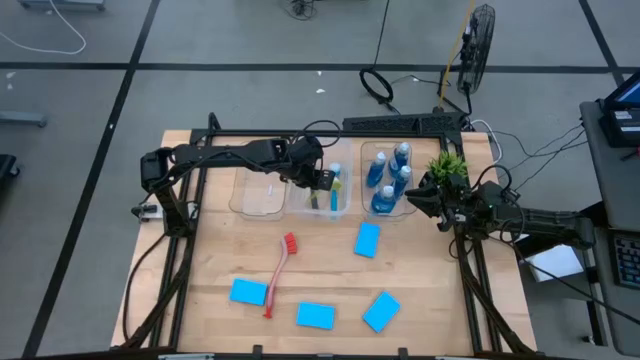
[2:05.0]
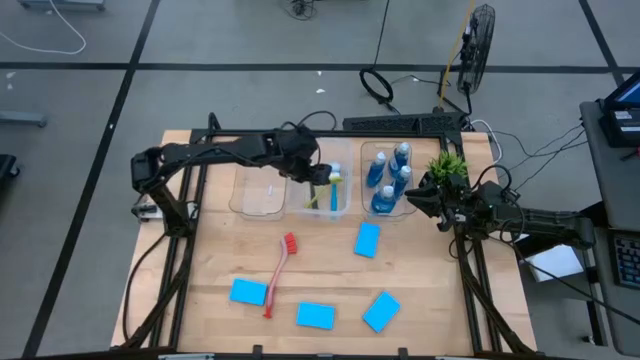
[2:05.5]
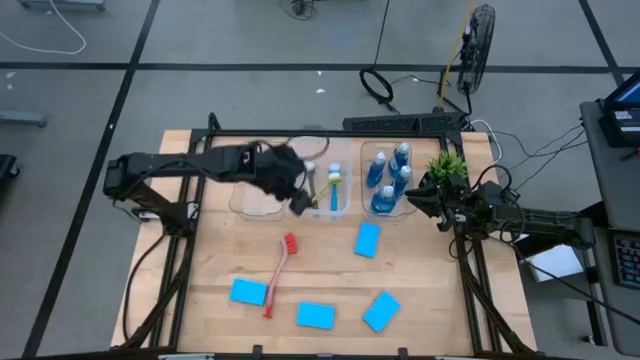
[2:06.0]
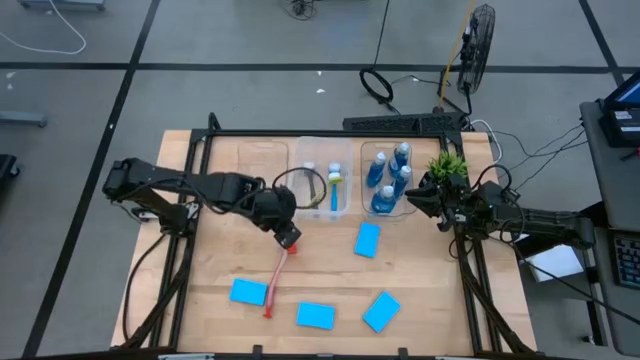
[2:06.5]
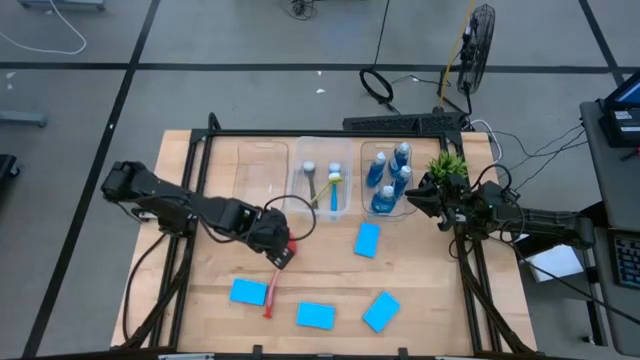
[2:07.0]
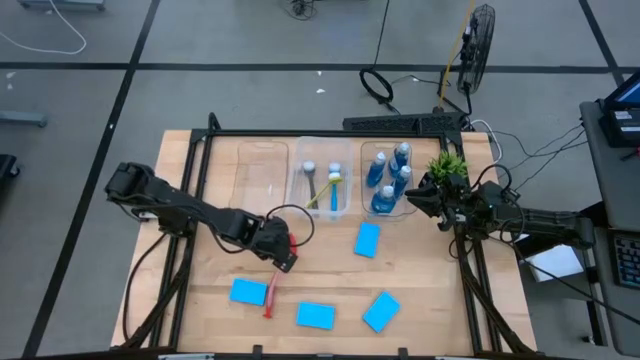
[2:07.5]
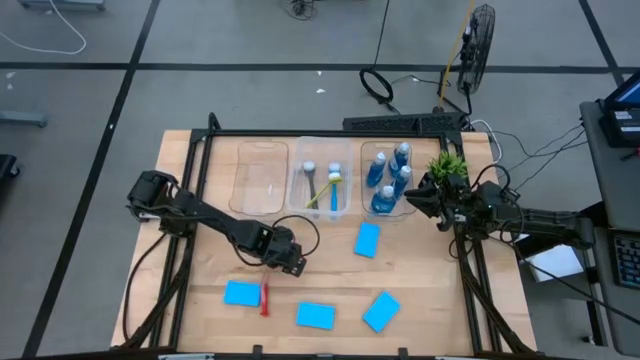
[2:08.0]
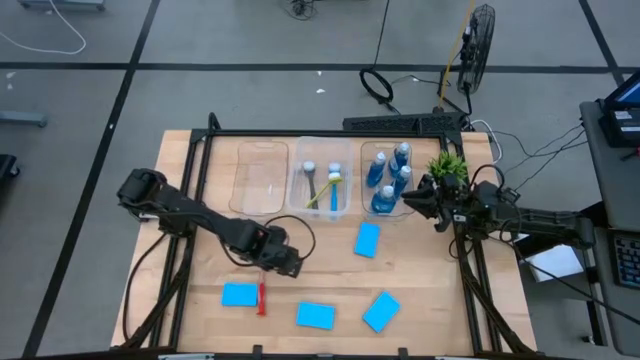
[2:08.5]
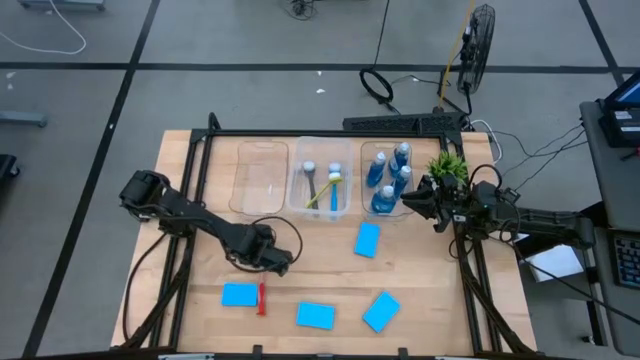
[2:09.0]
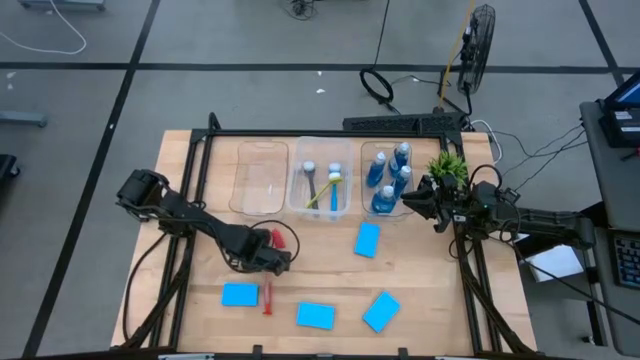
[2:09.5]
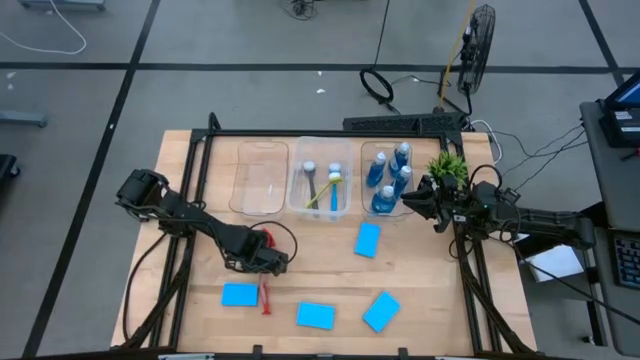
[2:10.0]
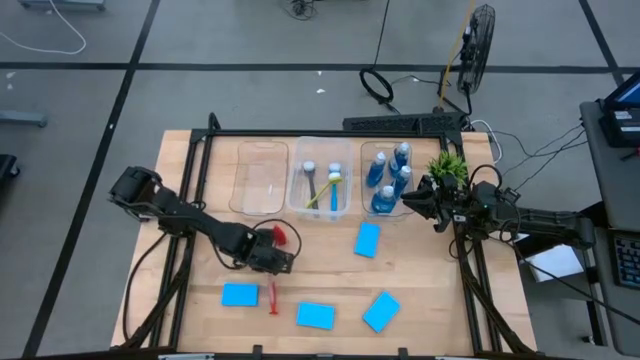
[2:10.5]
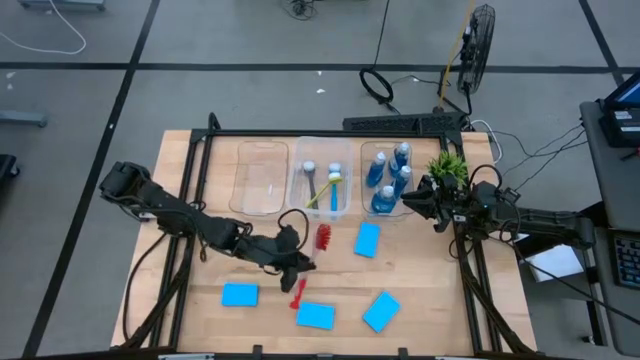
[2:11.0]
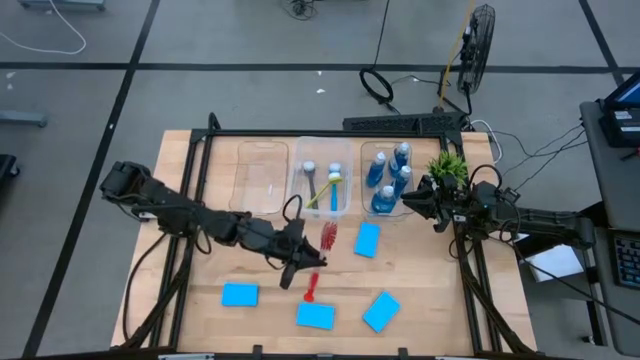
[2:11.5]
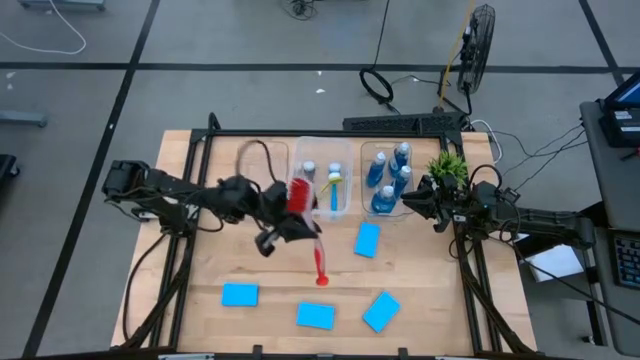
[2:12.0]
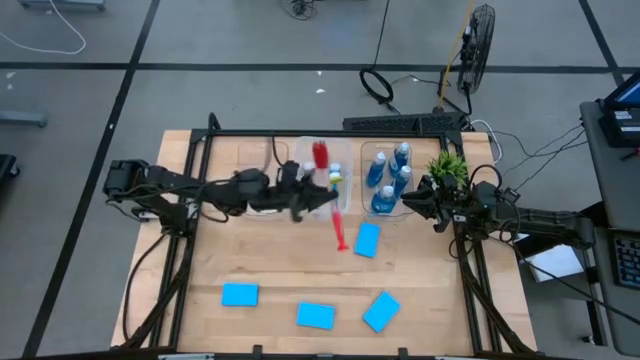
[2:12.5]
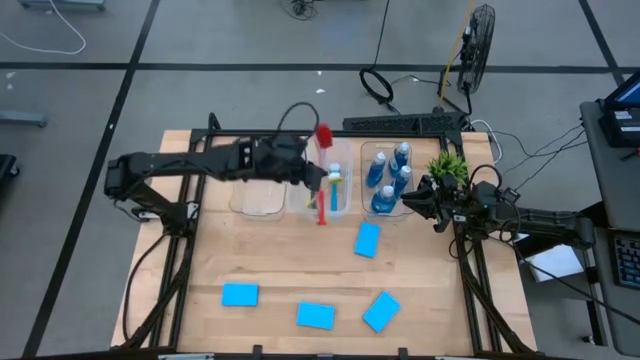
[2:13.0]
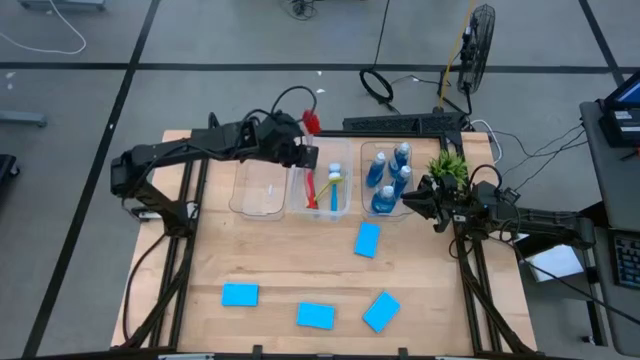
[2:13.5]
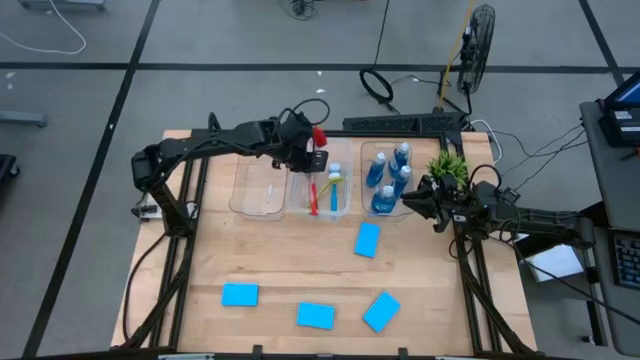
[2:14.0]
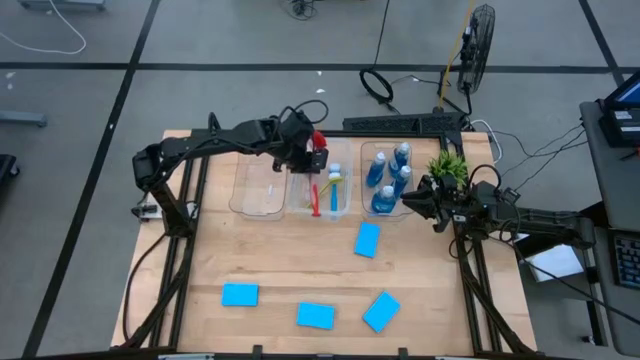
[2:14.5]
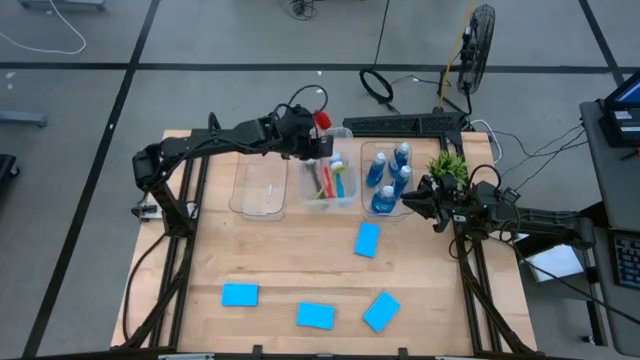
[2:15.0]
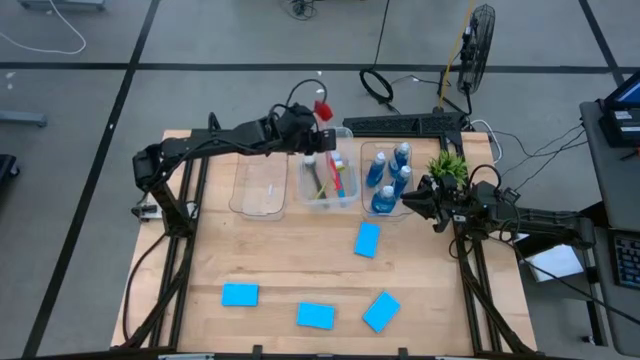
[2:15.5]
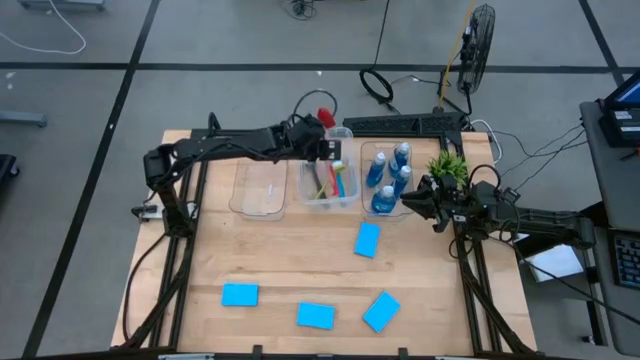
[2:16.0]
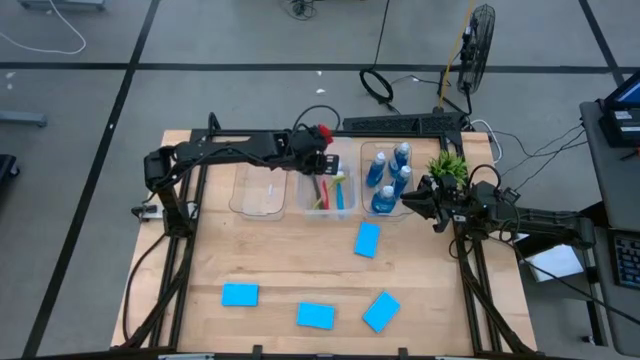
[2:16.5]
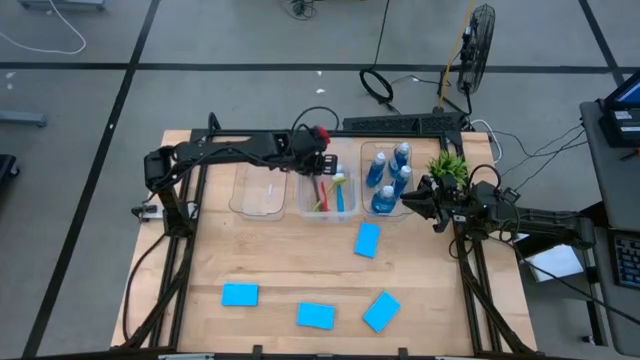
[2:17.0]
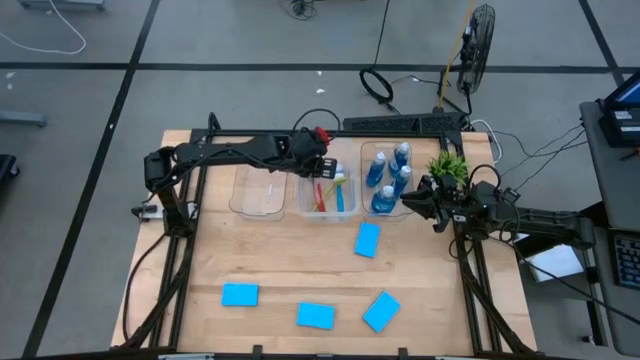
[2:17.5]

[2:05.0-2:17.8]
Task: Pick & Place Kitchen Sink Supplies
Put the orange dishwashing brush into the transparent white bin

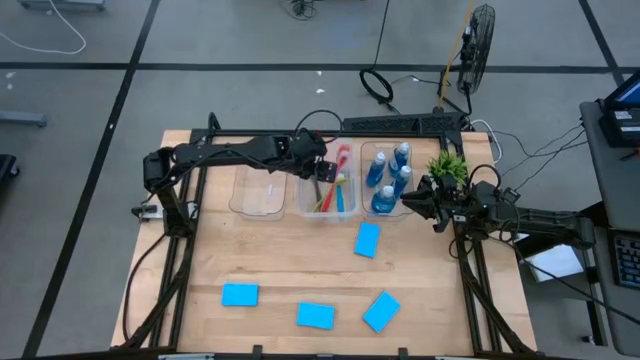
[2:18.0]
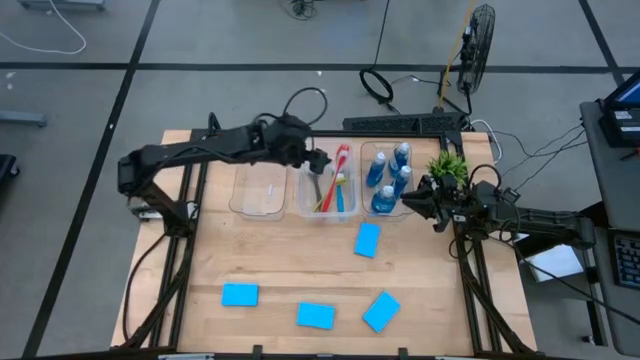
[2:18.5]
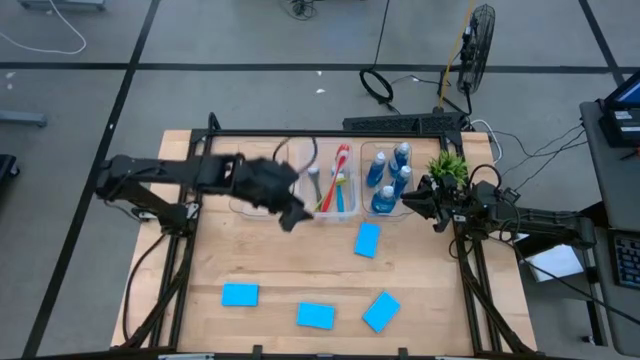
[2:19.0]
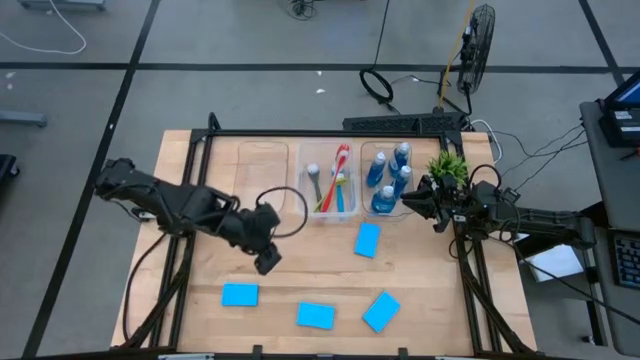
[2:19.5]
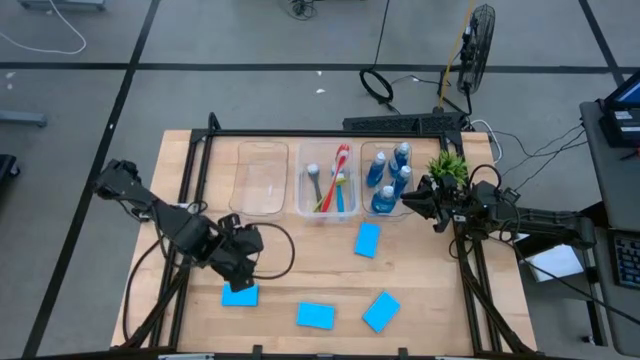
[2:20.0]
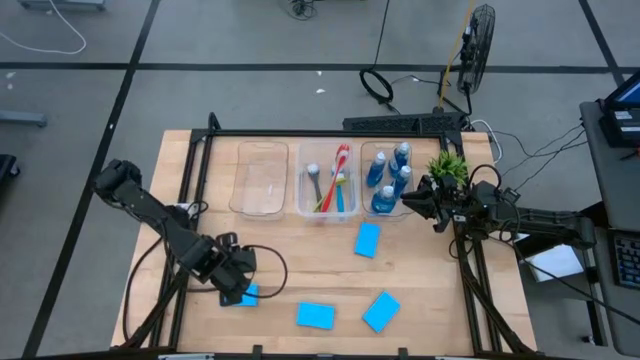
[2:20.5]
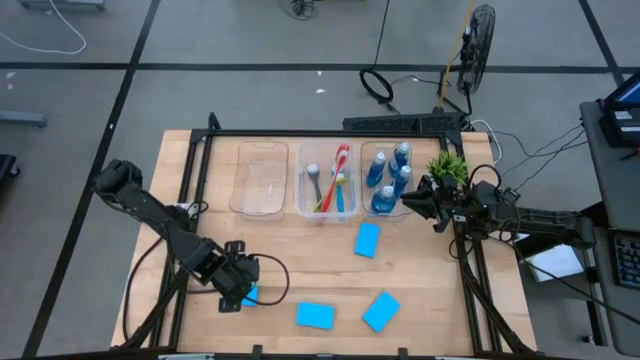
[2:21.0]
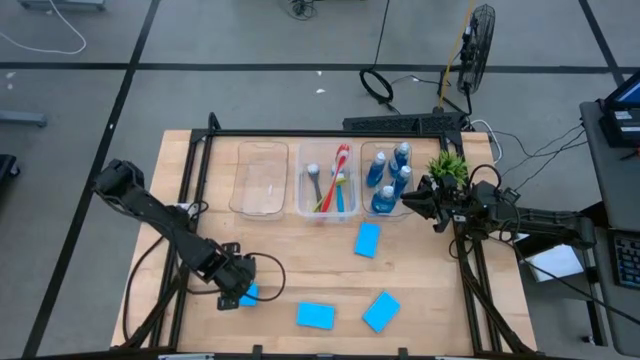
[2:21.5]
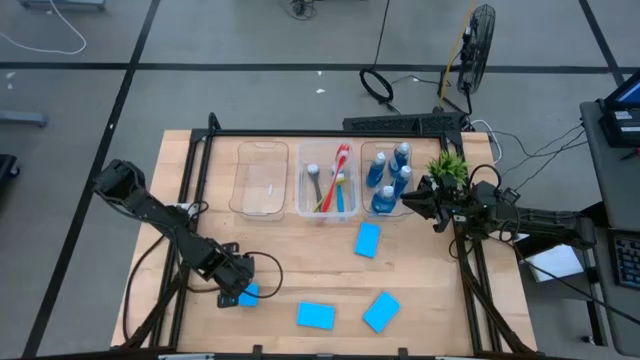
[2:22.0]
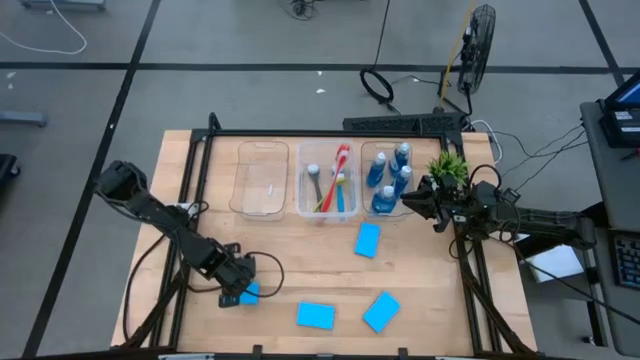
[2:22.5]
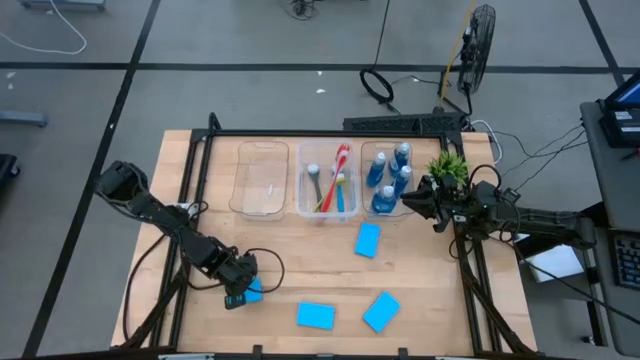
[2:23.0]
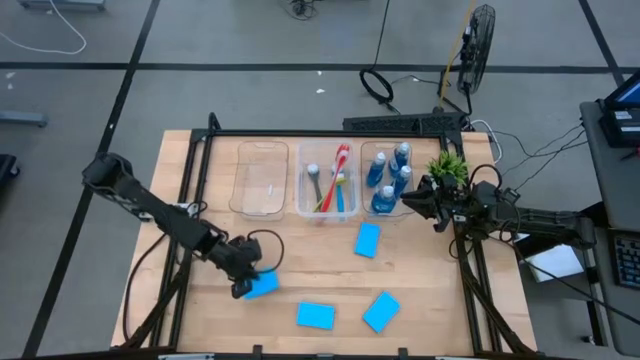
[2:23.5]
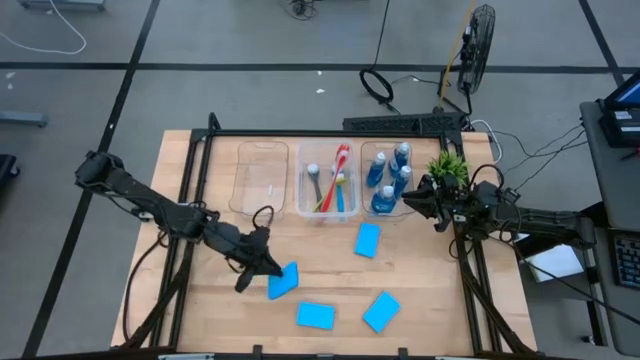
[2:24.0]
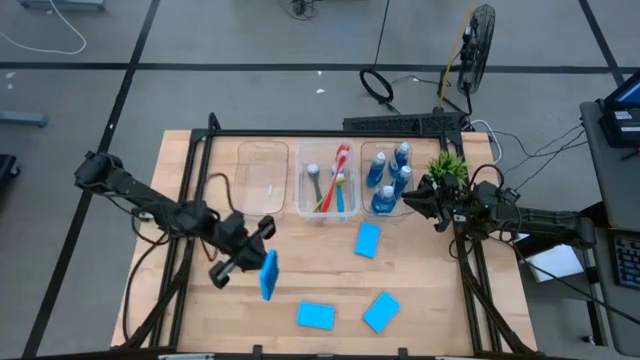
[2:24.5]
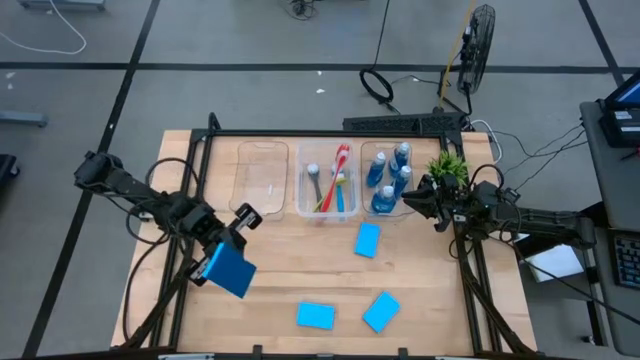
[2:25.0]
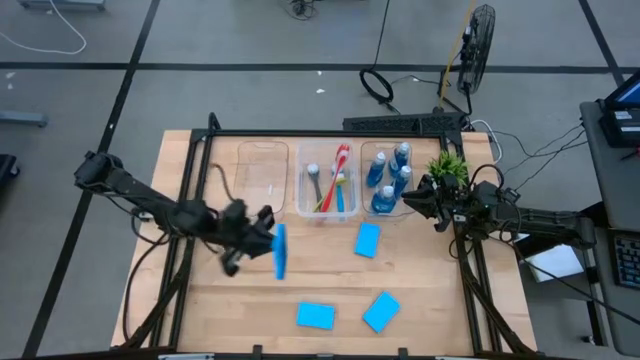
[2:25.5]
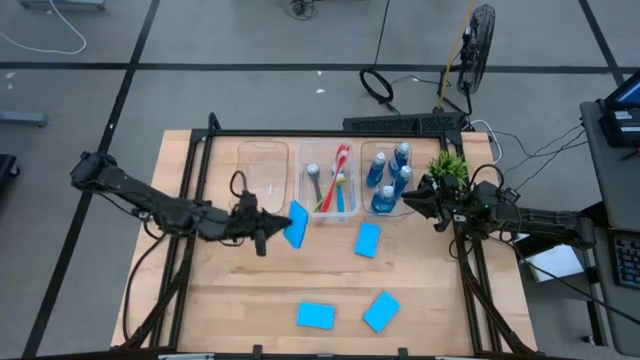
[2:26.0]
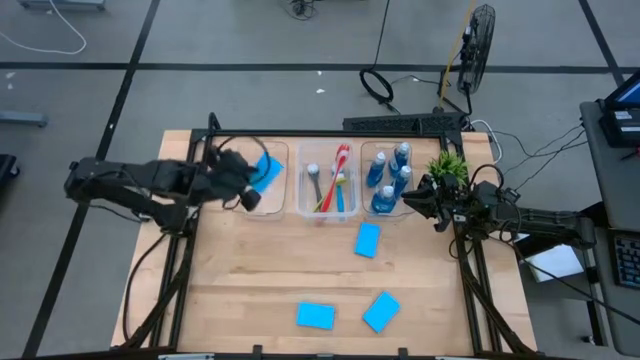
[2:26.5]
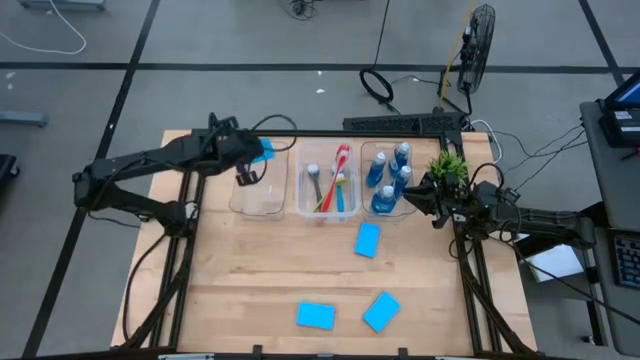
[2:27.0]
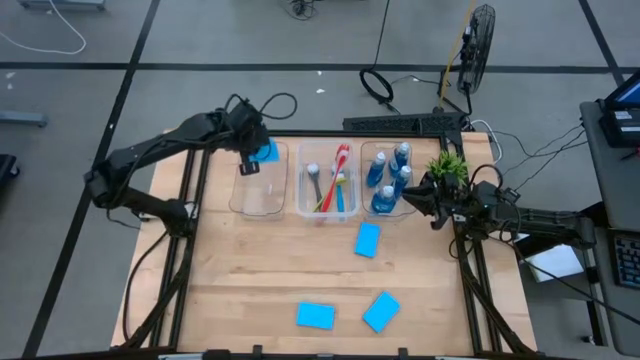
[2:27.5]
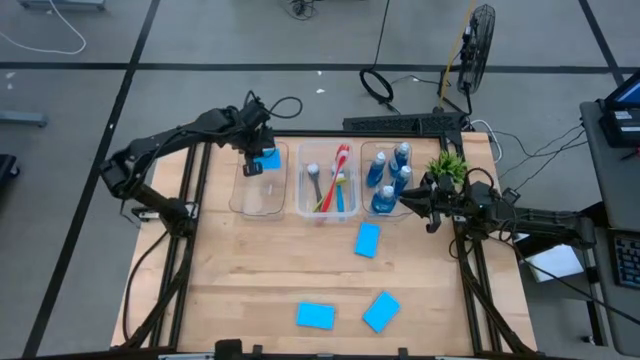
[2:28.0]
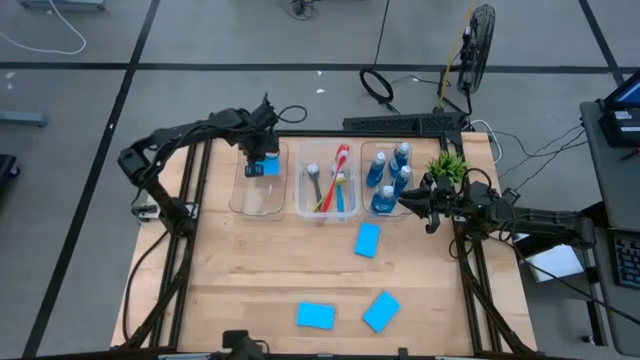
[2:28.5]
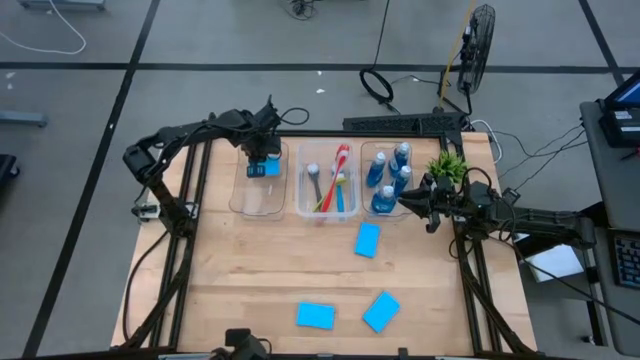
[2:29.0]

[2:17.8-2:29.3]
Put the blue sponge into the left transparent bin
